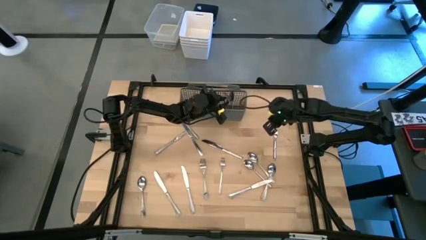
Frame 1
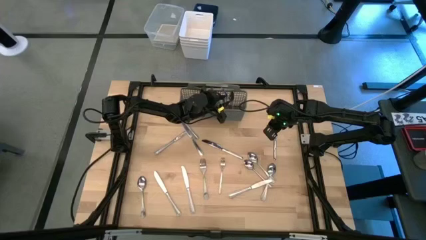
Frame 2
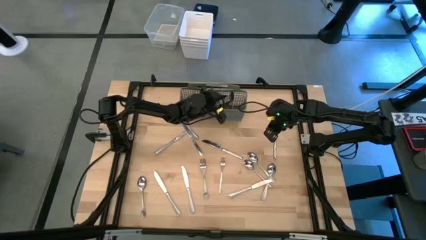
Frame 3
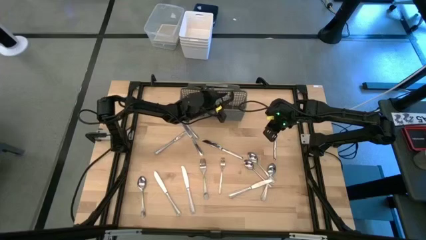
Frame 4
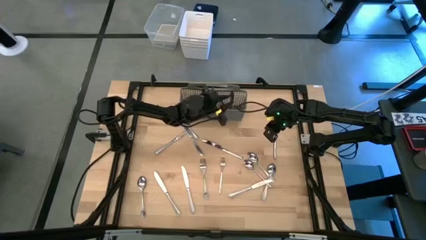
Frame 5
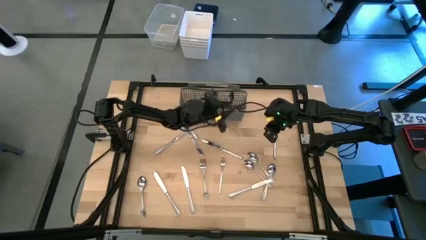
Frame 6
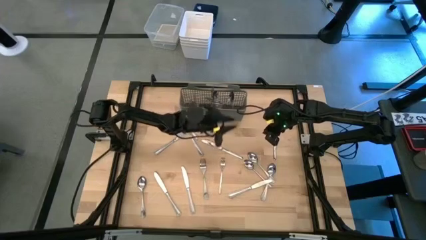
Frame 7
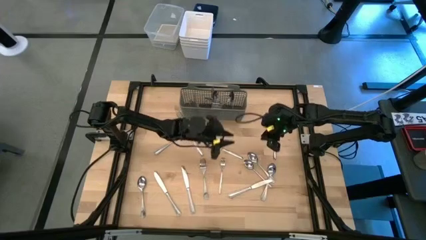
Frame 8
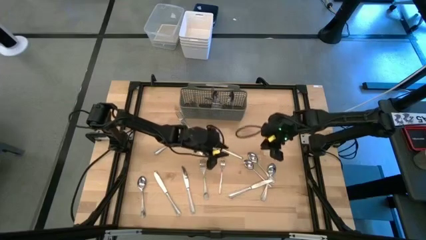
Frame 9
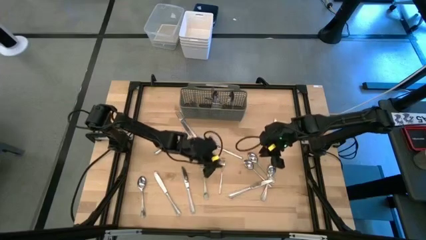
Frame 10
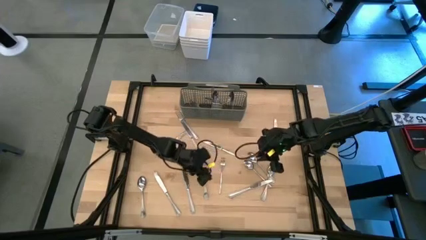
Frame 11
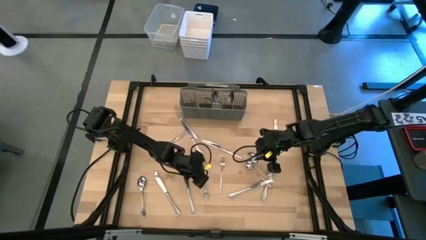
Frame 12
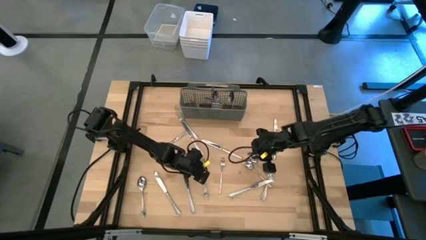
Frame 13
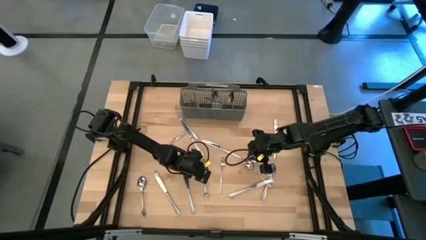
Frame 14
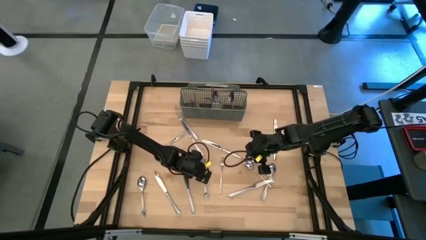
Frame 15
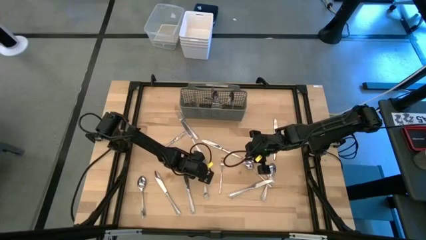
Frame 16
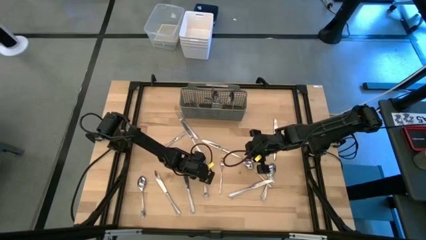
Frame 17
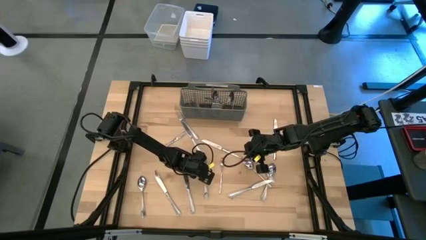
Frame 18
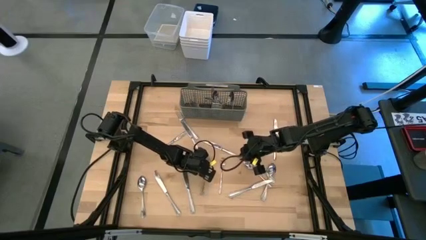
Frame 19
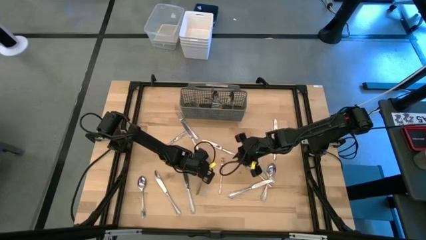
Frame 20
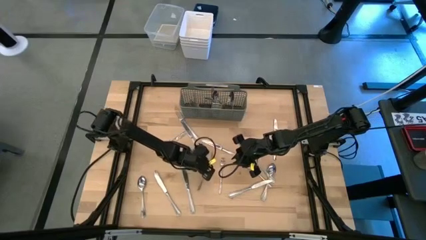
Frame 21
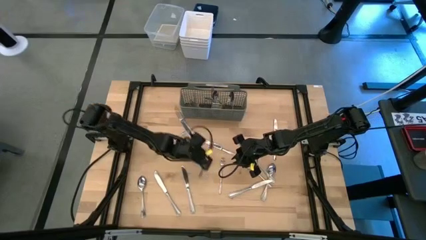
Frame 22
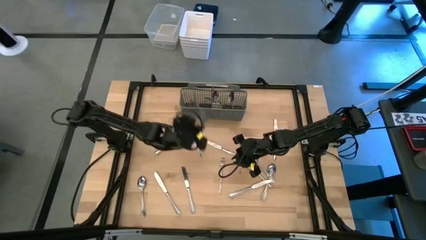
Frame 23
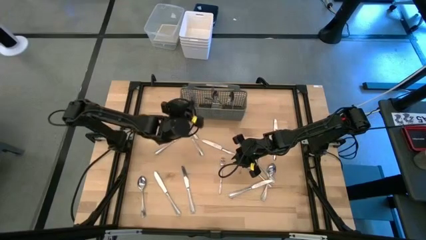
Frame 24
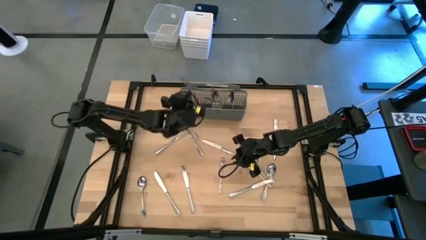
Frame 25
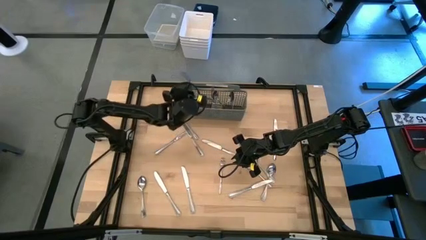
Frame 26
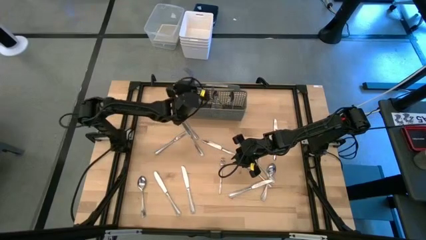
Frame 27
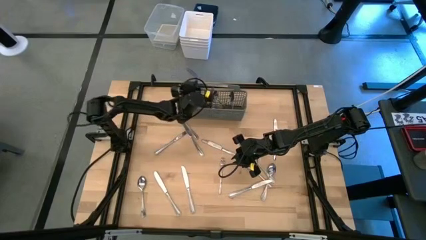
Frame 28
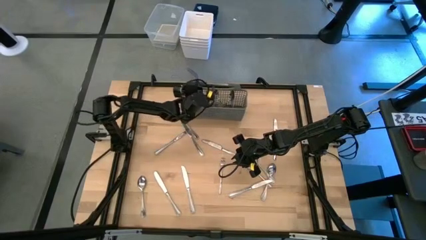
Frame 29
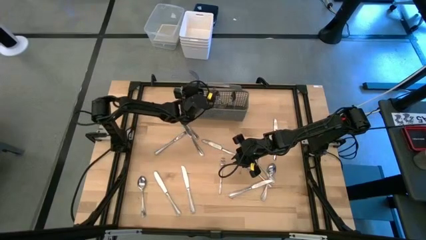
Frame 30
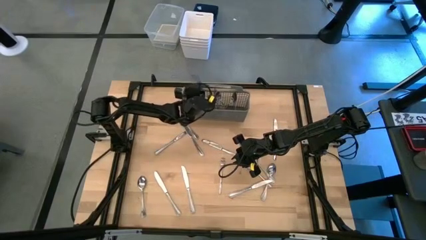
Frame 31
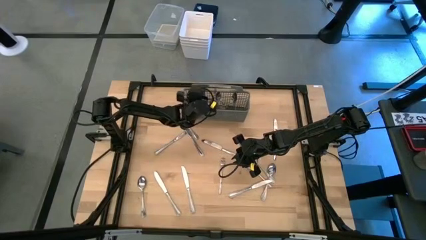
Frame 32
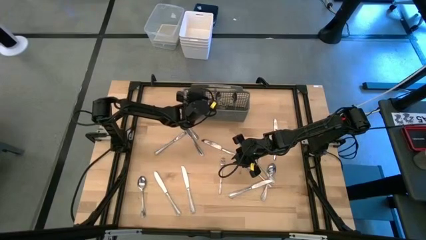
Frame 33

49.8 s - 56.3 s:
Task: Sort silverware
Put the silver fork into the gray silverware organizer

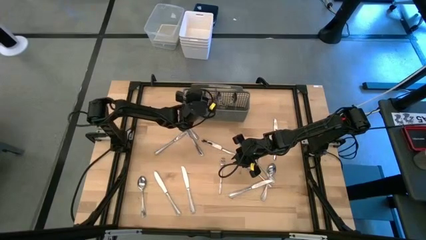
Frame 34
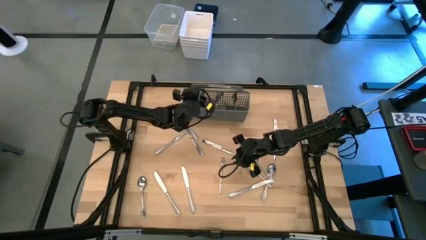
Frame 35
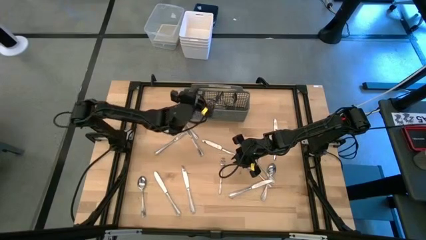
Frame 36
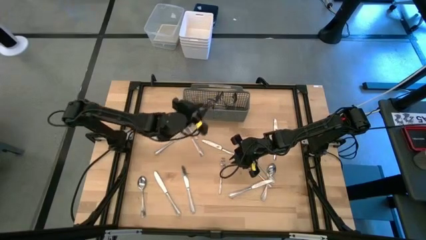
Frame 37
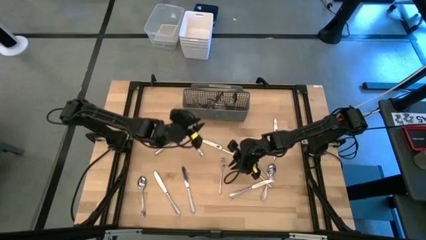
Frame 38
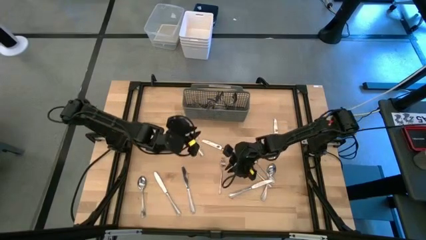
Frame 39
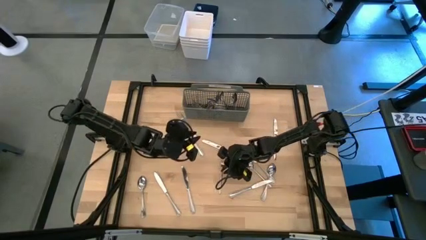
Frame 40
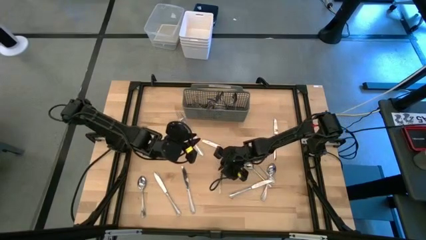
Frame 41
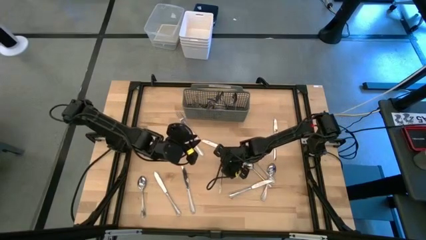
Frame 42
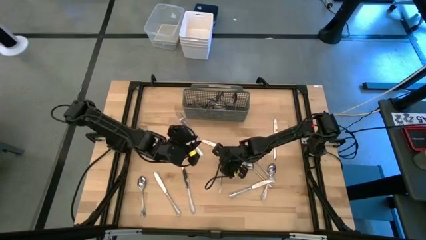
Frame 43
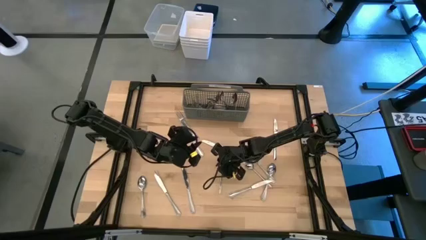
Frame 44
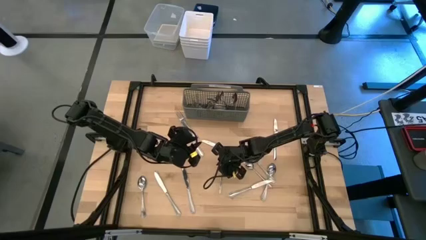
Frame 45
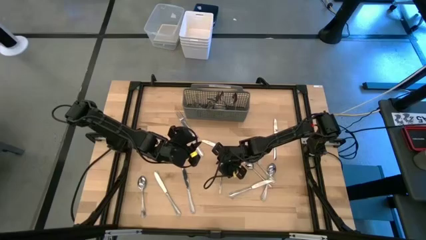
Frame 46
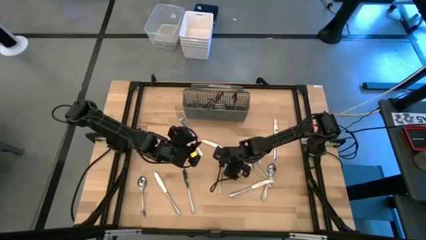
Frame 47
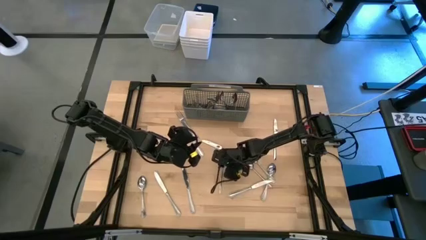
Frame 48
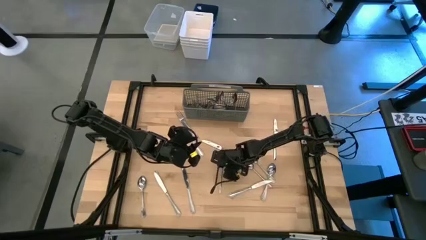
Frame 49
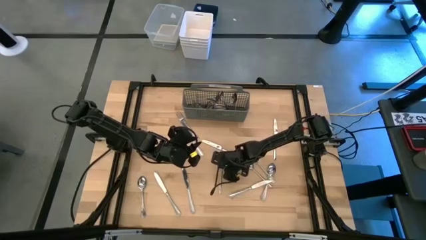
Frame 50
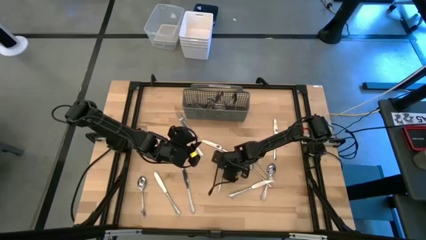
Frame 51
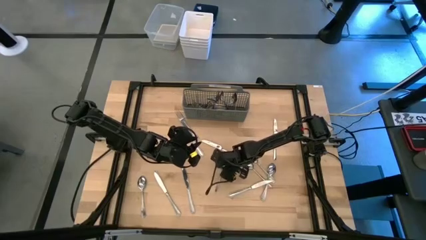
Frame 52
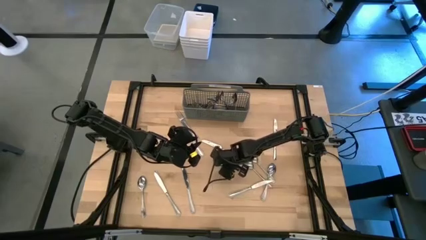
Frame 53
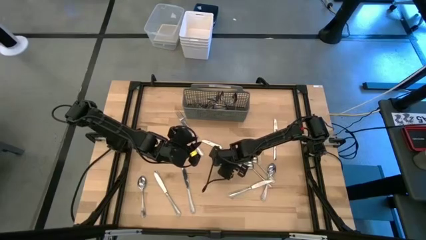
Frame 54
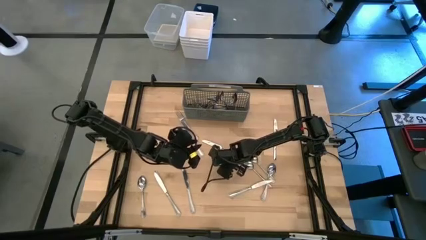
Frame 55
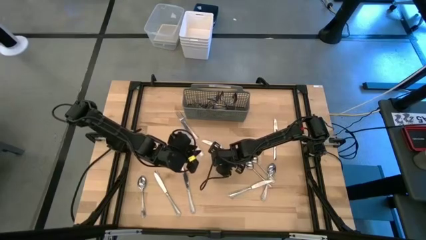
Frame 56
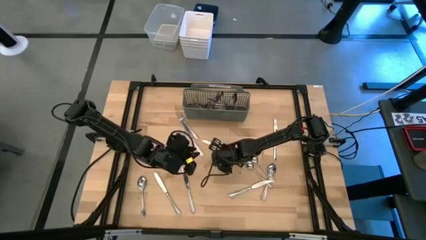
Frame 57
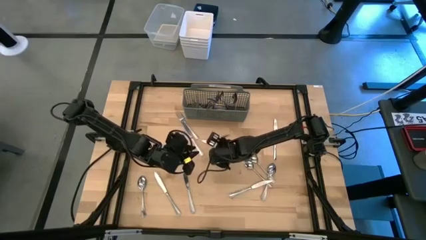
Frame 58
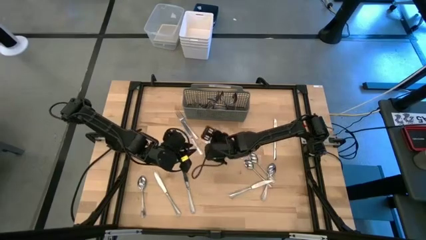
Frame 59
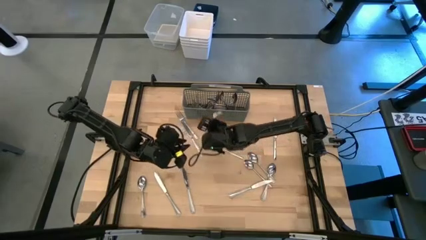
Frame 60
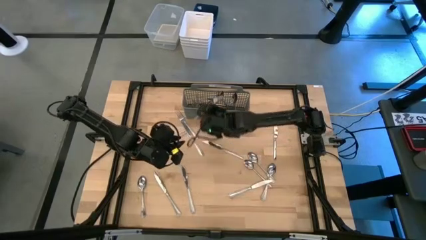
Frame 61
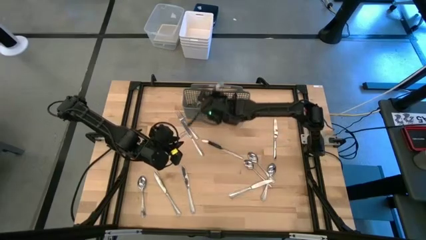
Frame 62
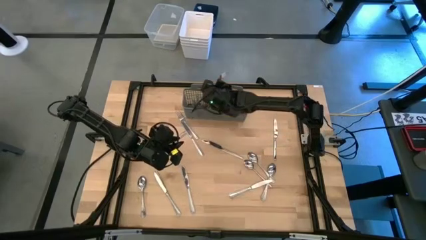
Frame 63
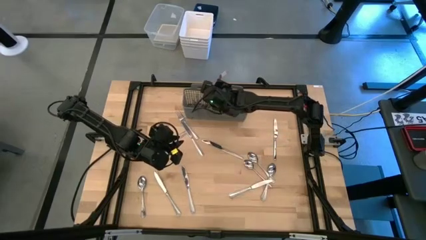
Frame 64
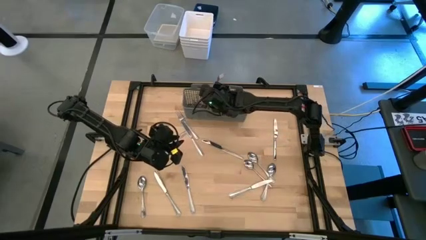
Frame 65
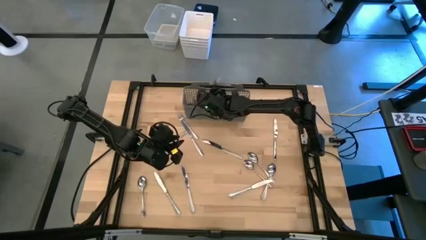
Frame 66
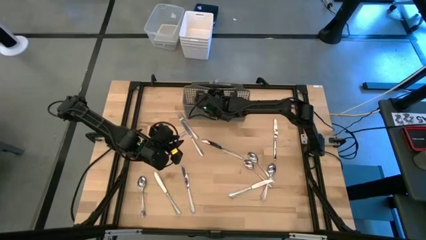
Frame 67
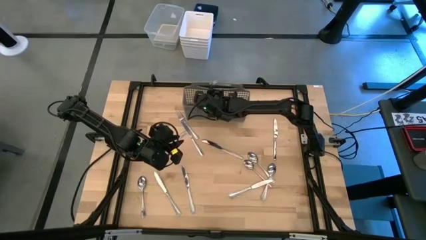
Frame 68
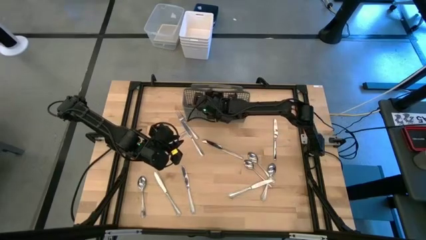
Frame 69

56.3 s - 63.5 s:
Put the silver fork into the gray silverware organizer

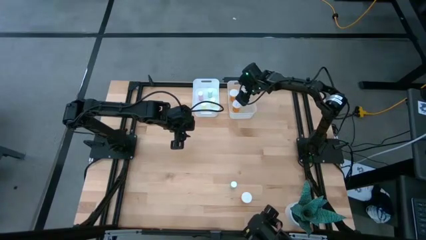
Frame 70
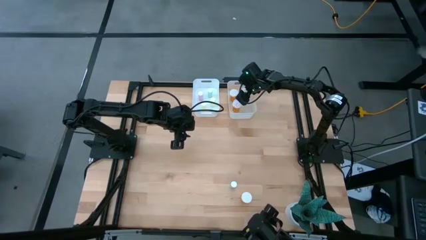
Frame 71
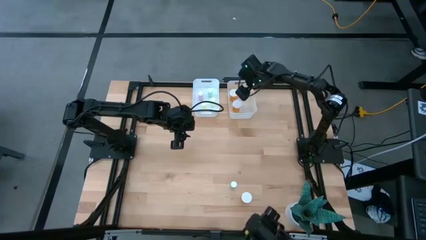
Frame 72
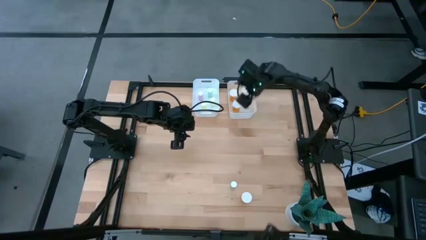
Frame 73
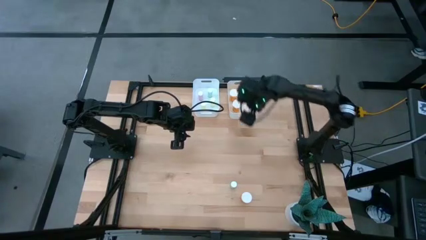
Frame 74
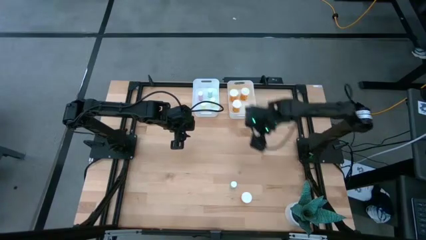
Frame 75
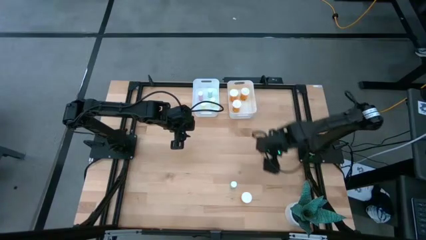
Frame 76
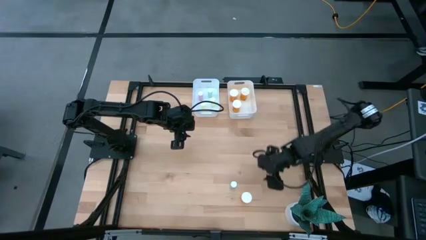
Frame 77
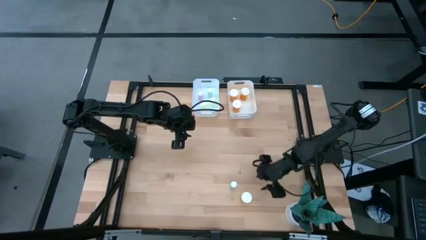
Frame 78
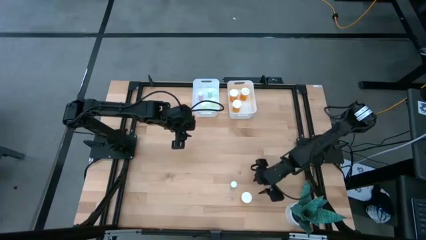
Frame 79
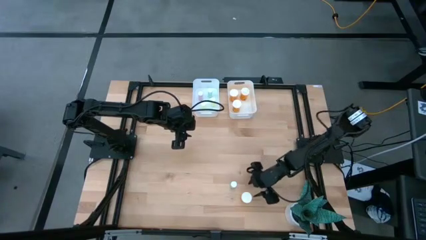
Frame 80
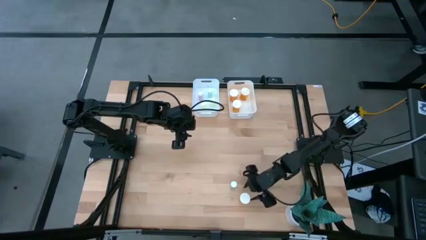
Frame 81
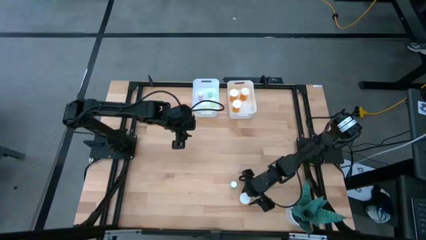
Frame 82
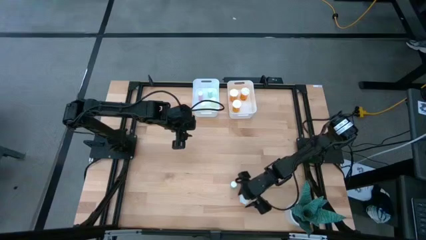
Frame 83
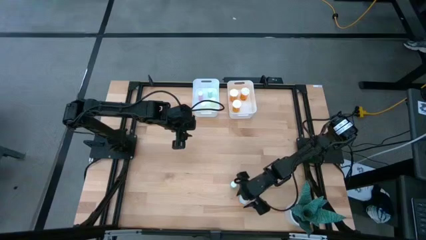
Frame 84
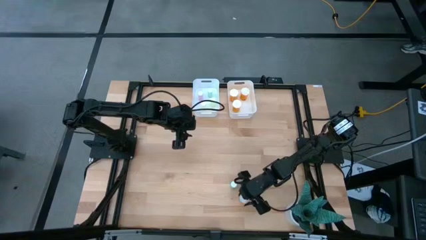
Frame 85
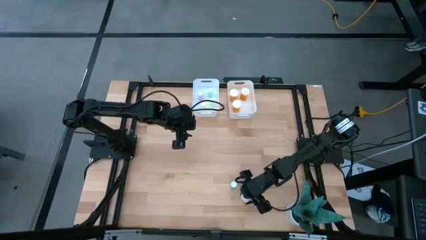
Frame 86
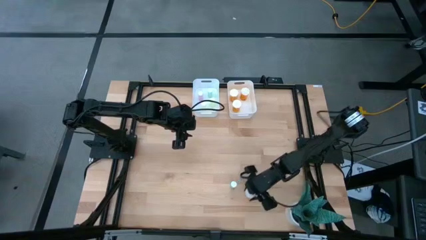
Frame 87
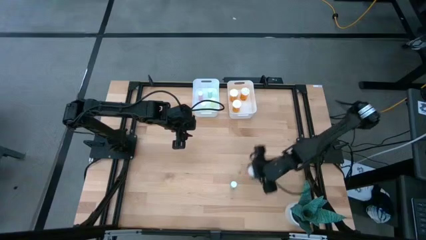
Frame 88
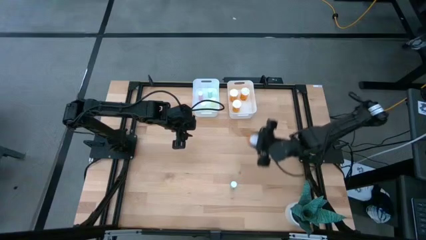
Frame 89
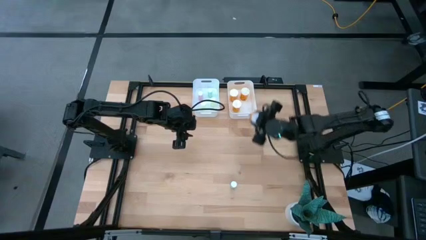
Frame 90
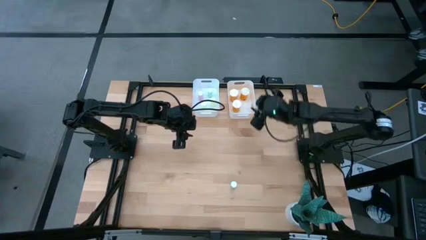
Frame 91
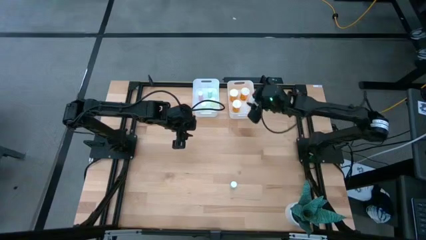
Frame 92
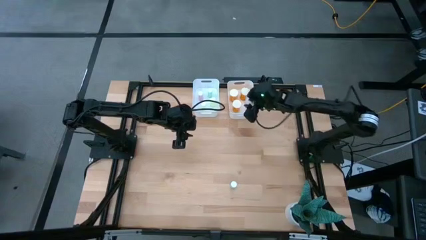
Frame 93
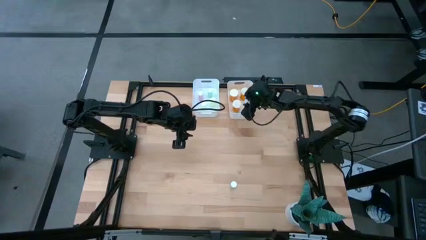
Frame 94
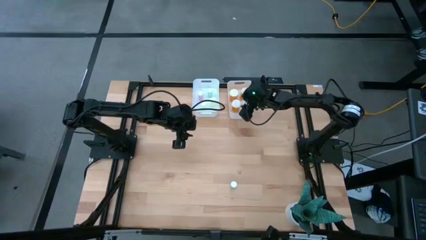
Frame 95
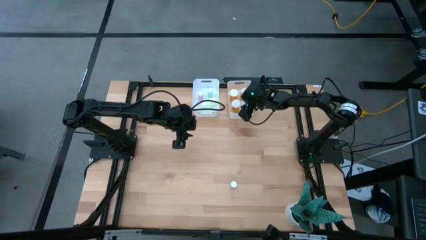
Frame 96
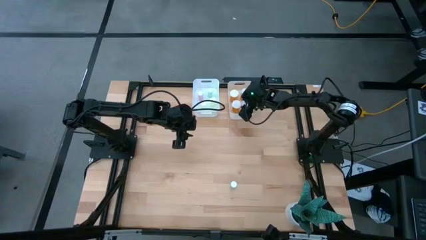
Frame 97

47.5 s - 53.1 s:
Task: Pick and place medicine bottles into bin by pill shape (circle, oval)
Put the orange capsule bottle into the white right bin
